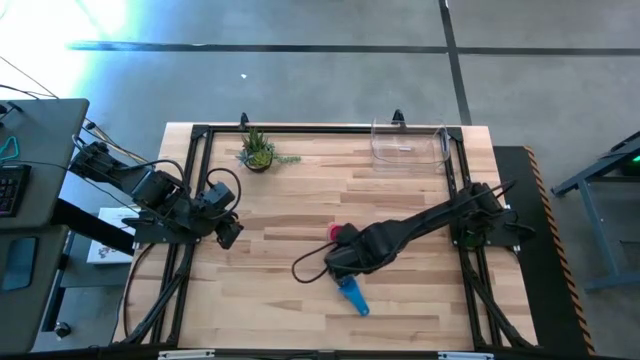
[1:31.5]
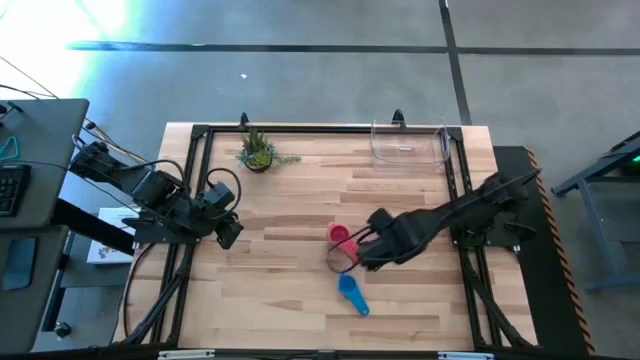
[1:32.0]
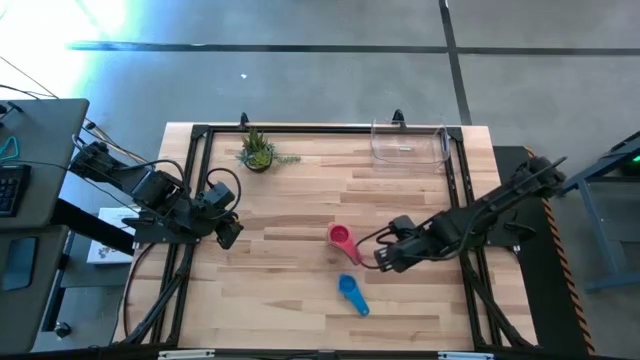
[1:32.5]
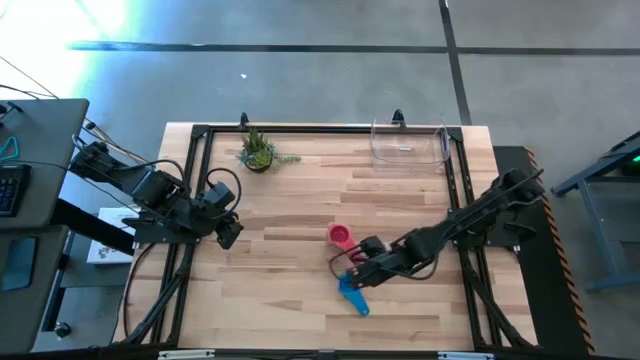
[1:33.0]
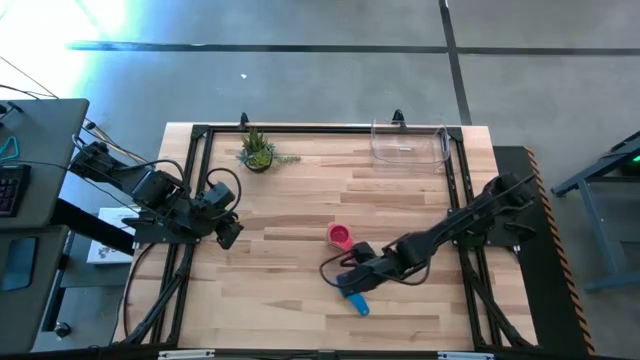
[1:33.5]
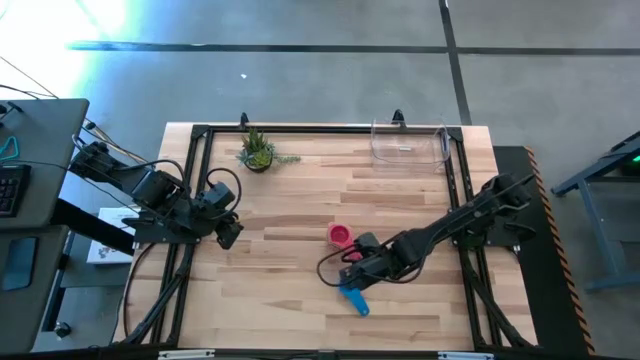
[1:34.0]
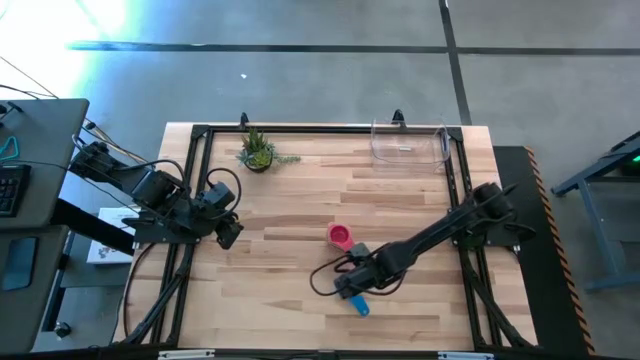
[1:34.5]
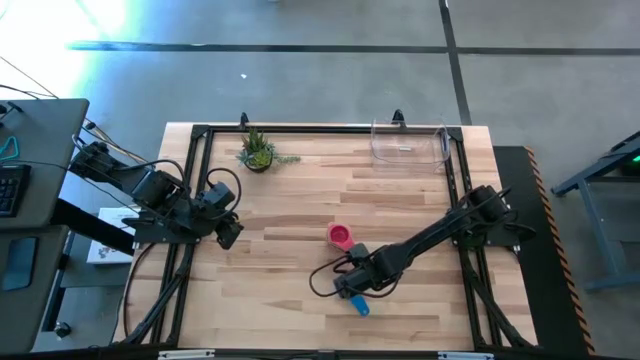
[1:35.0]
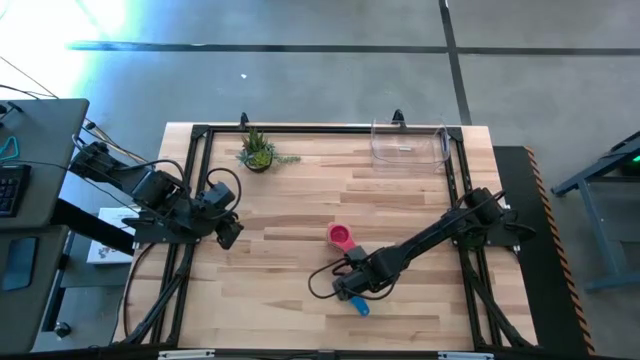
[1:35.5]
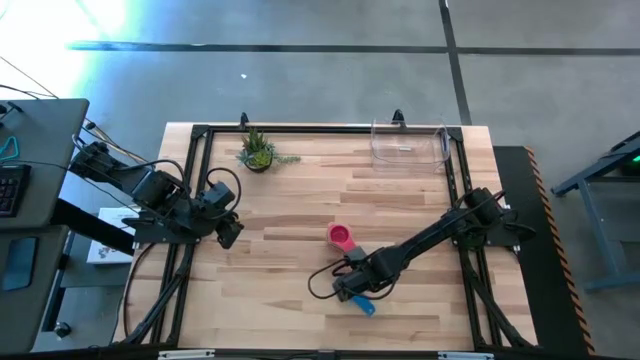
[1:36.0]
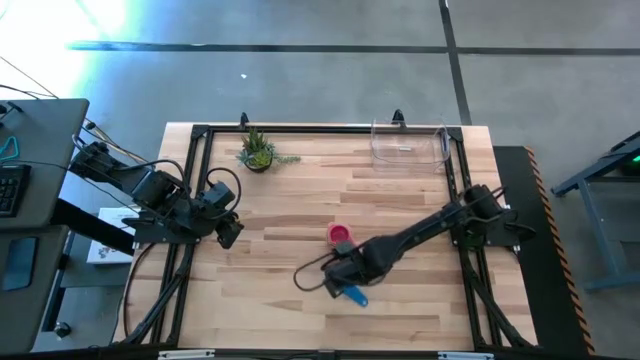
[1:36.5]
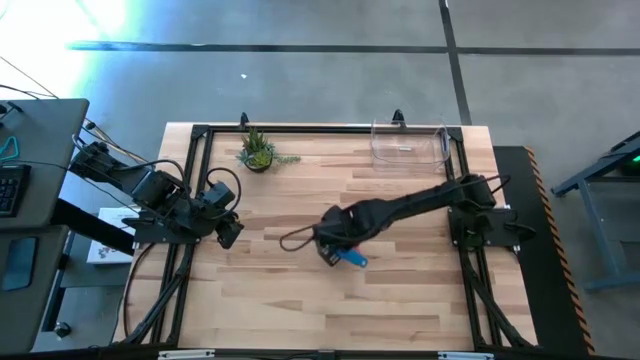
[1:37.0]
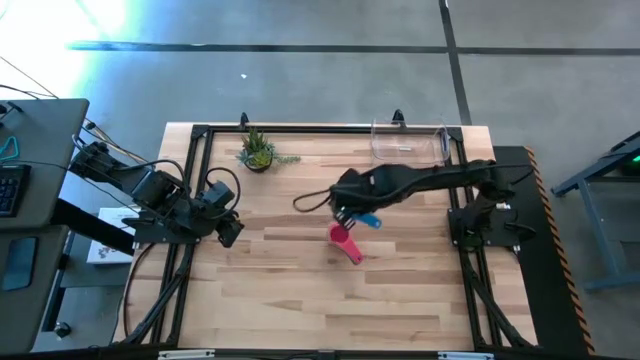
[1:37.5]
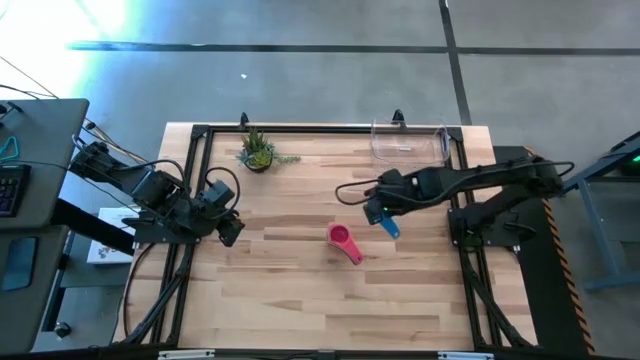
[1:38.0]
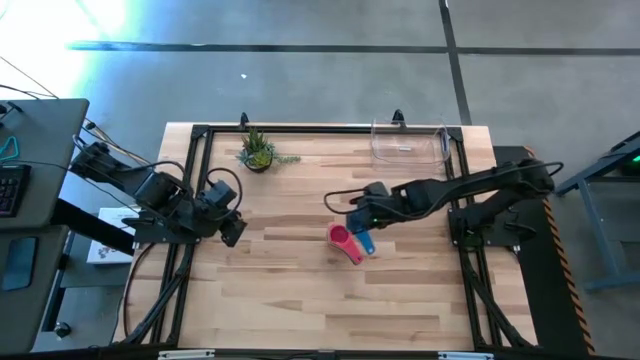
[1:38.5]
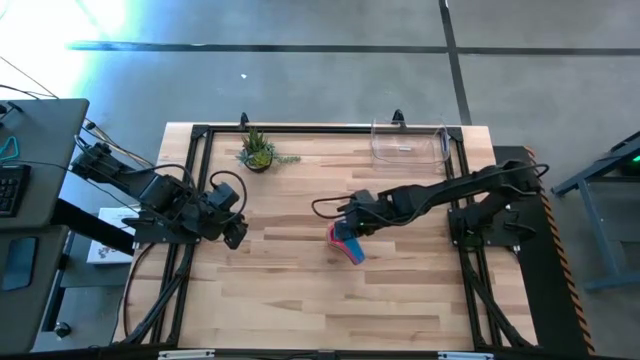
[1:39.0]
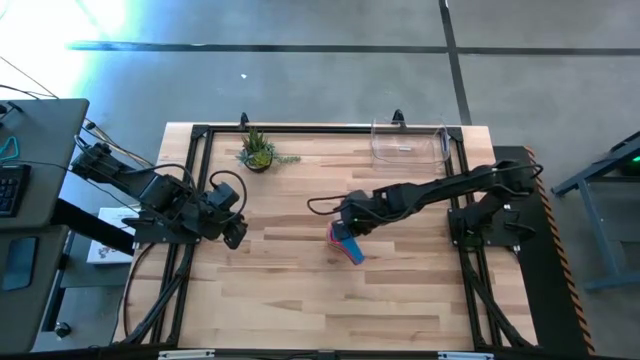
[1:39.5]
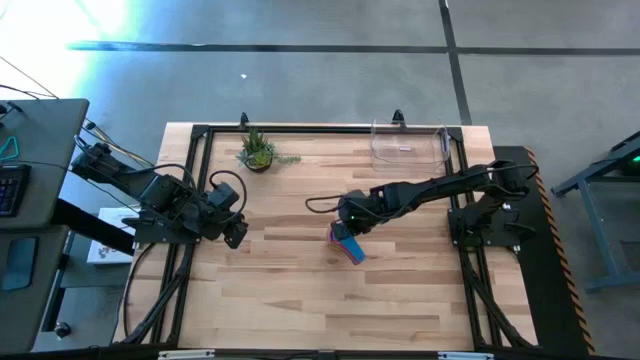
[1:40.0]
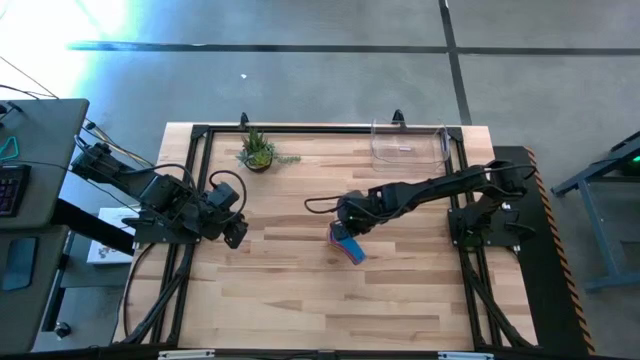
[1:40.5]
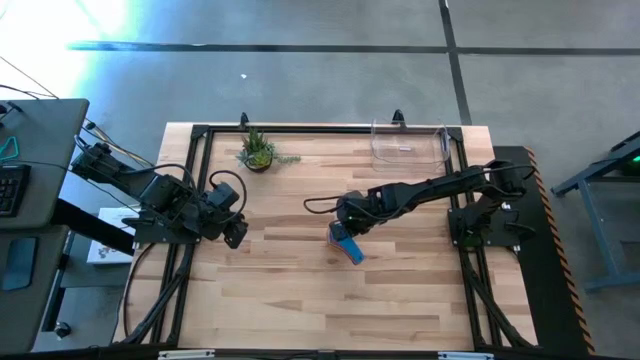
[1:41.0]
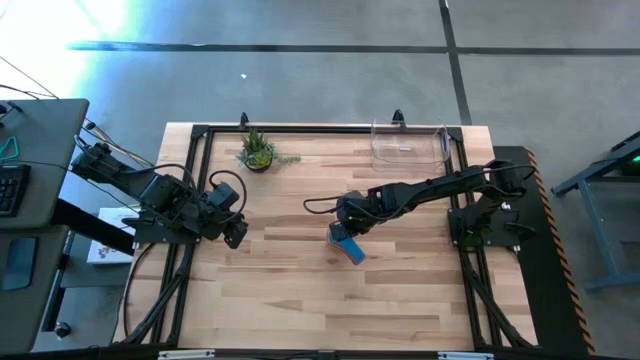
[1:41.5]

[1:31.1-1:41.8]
Task: Nest measuring cups in basket
Stack the blue measuring cup on top of the red measuring cup

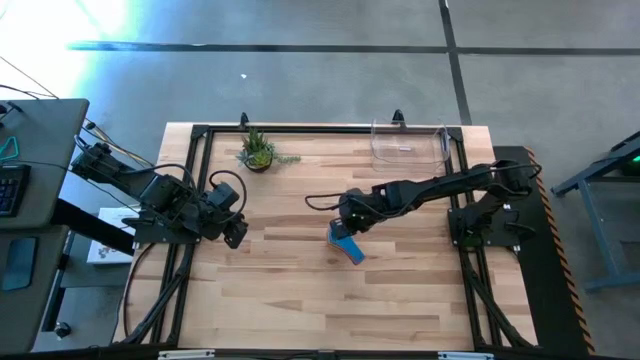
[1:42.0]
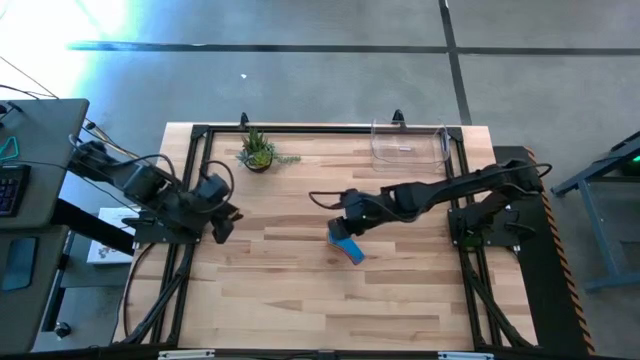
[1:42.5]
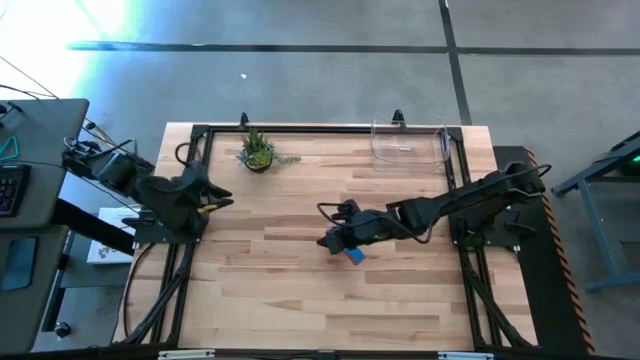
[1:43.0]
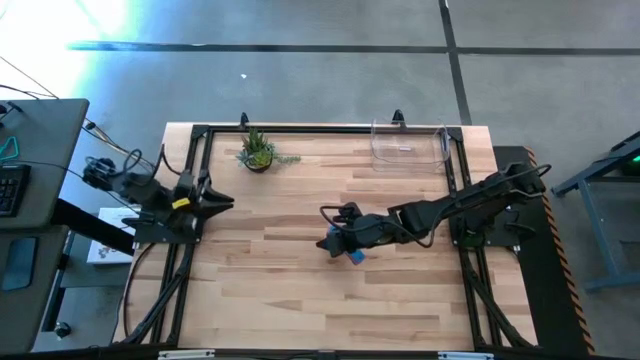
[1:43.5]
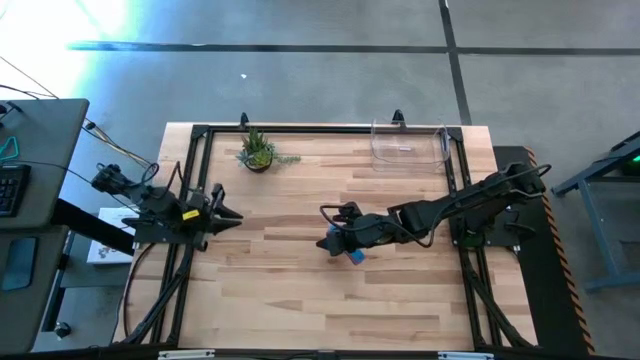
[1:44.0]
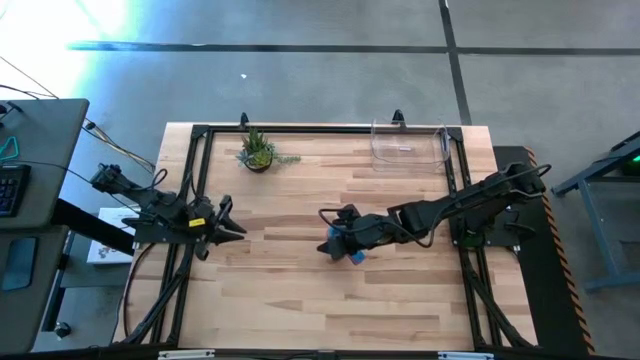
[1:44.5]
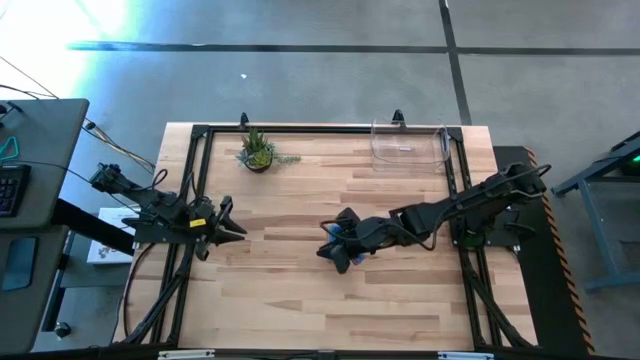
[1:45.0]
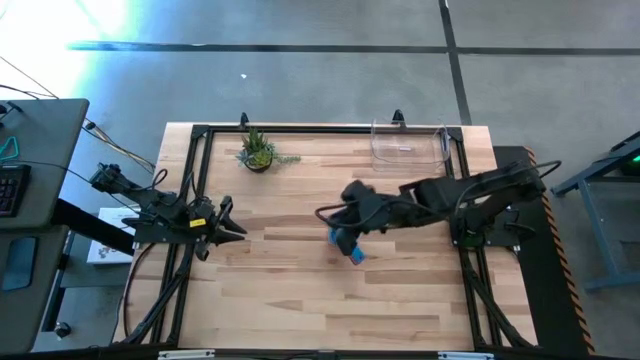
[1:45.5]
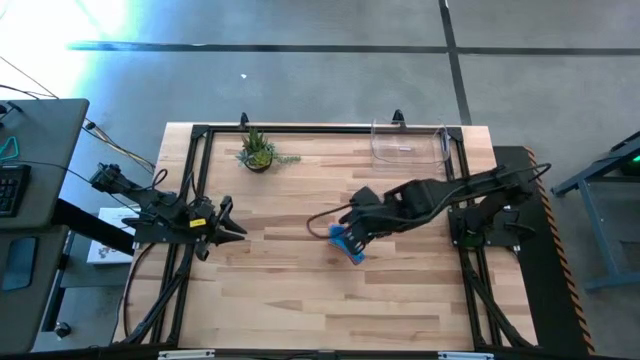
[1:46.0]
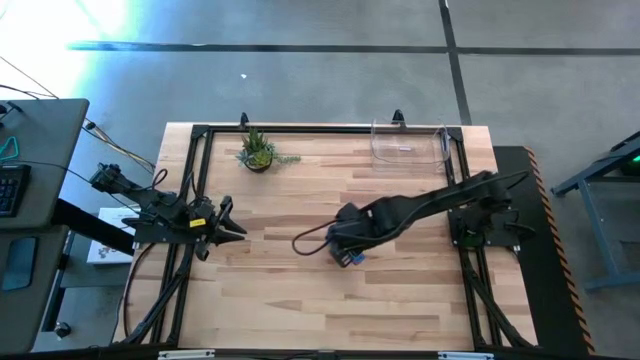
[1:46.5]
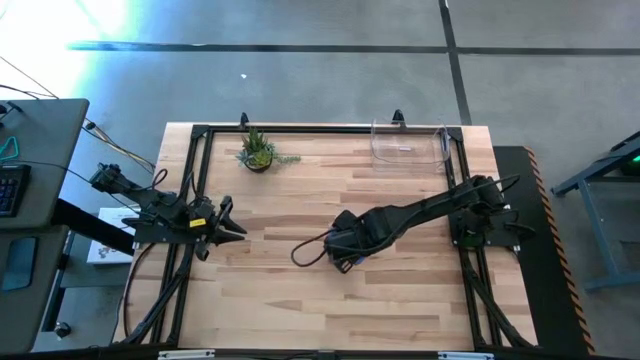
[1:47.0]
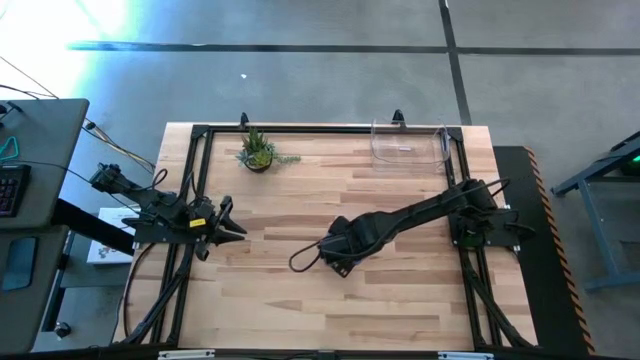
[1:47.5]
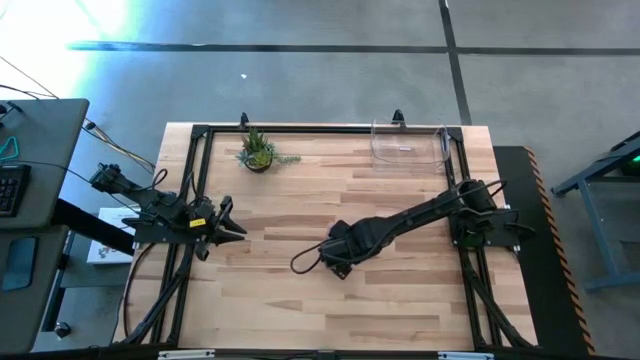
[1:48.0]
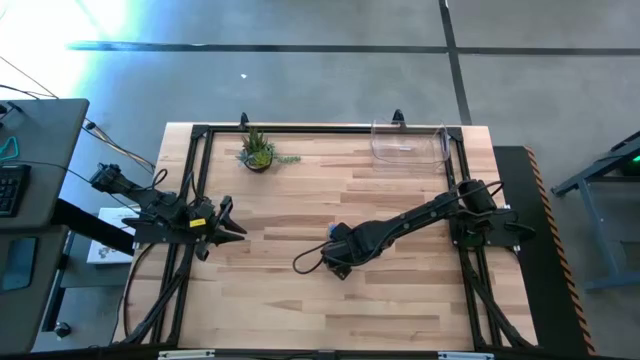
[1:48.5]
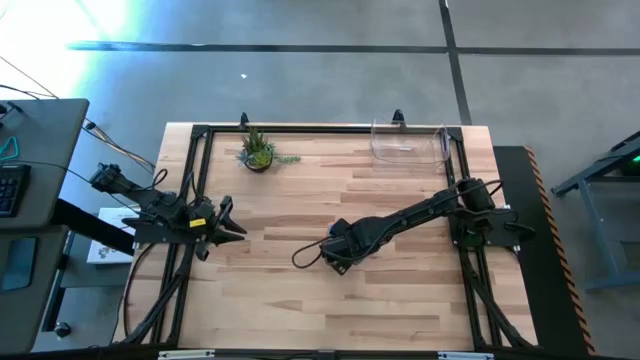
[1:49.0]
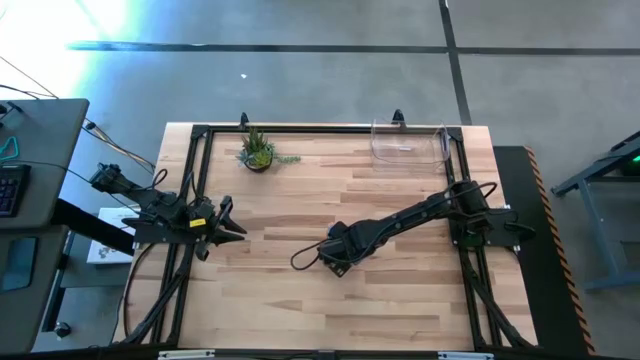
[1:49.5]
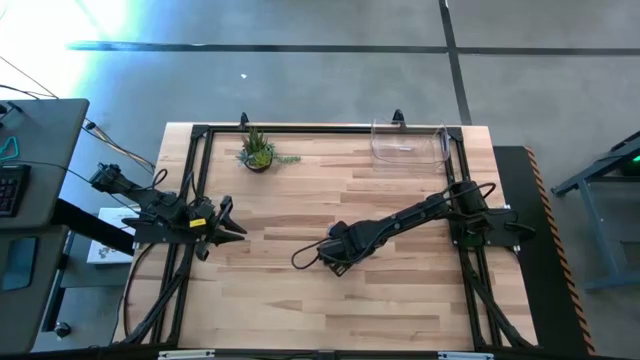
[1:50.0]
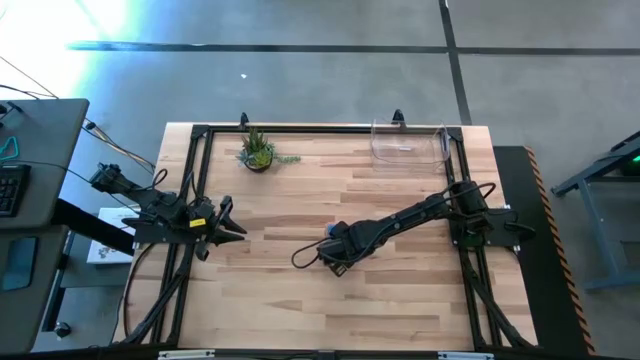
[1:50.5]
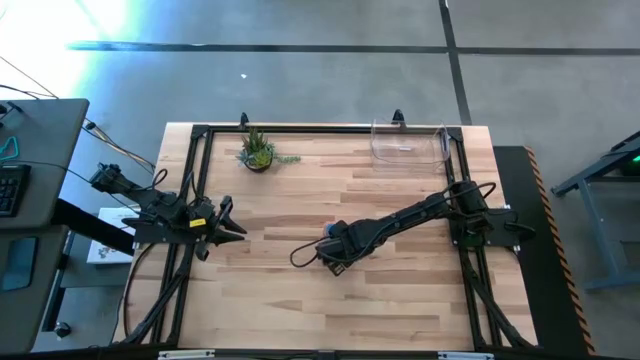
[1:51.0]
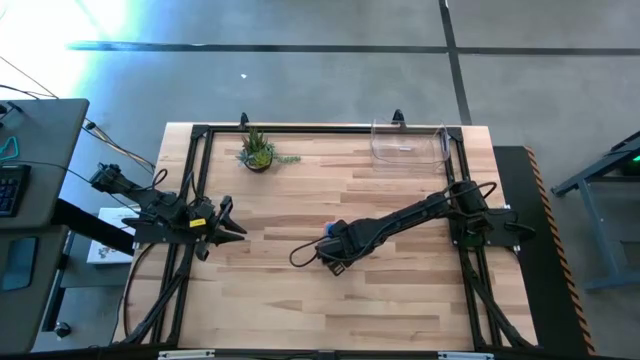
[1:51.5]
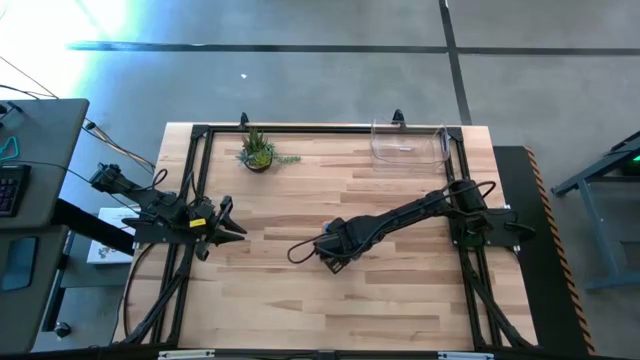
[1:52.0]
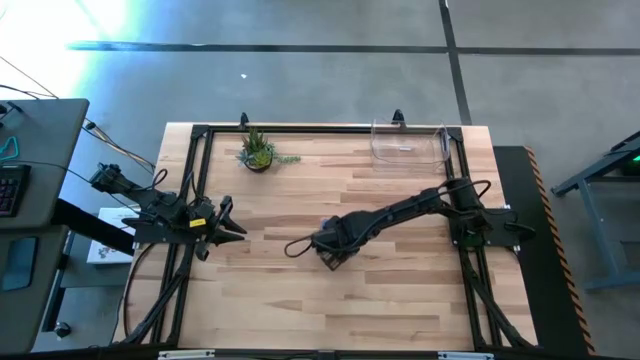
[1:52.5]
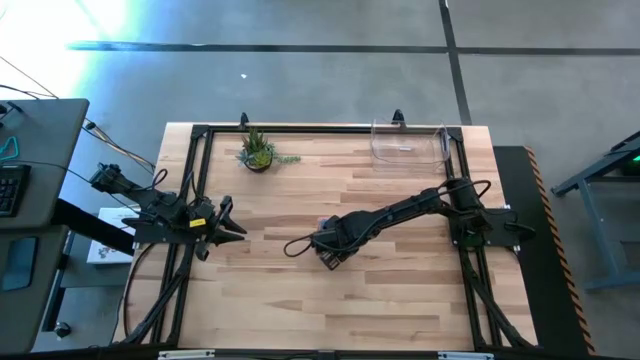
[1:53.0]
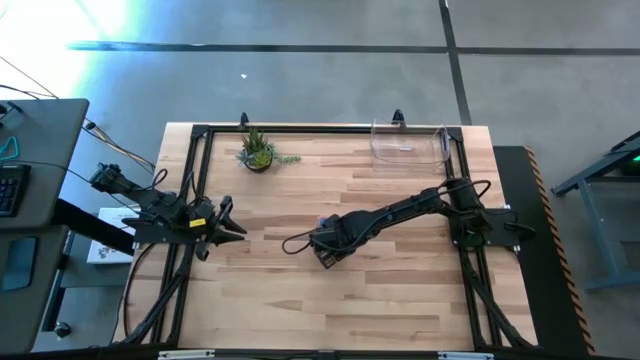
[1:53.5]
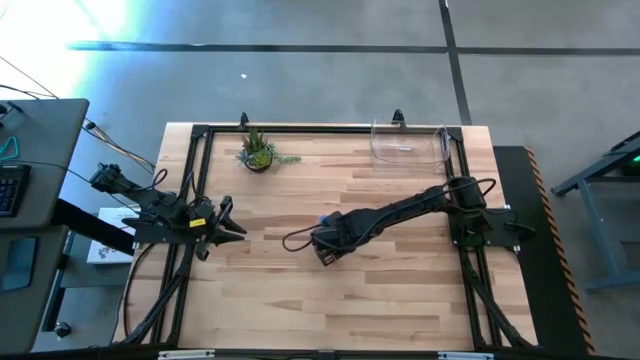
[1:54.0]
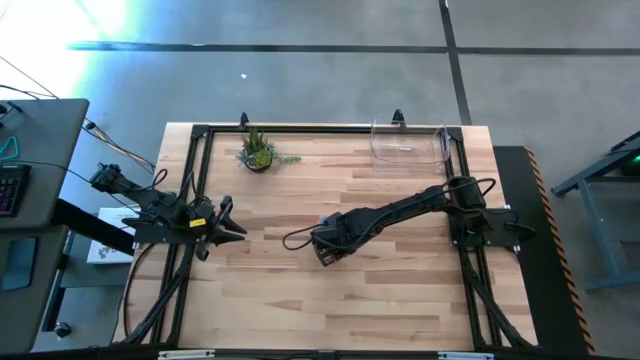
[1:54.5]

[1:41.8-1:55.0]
Put the stacked measuring cups into the transparent bin
